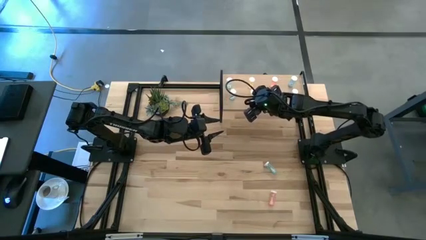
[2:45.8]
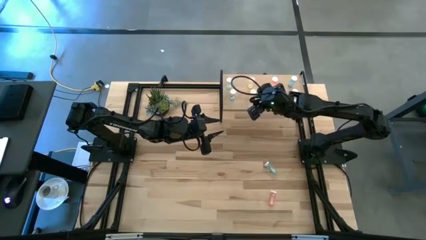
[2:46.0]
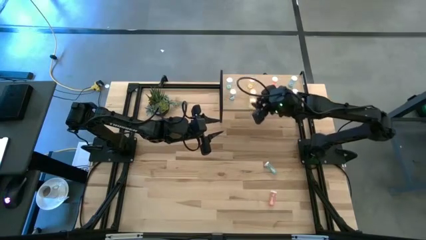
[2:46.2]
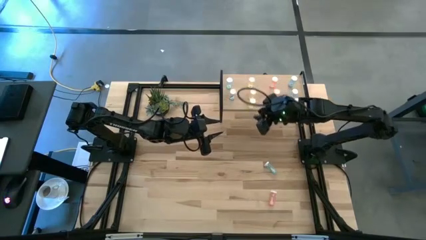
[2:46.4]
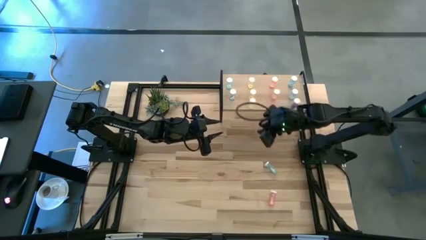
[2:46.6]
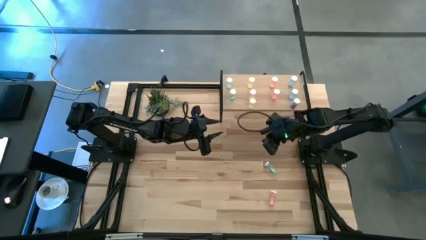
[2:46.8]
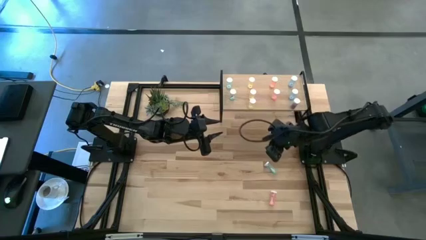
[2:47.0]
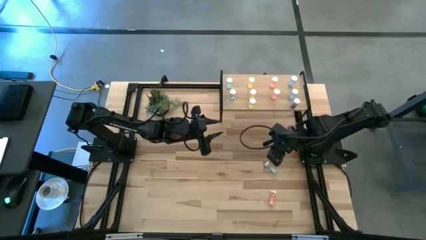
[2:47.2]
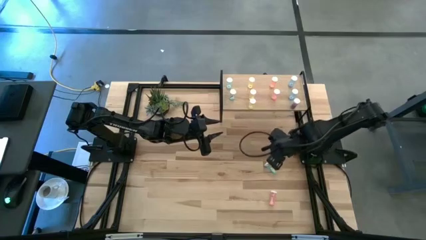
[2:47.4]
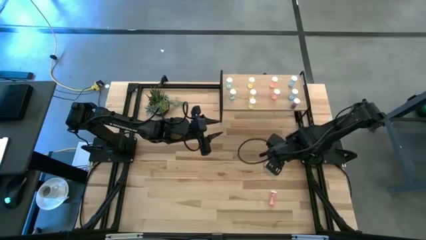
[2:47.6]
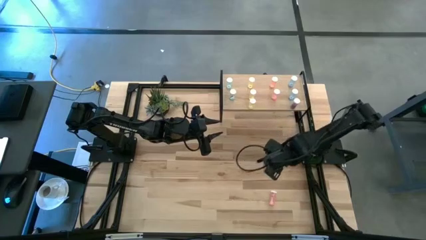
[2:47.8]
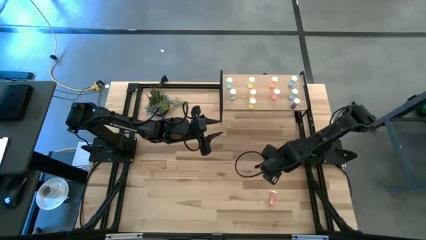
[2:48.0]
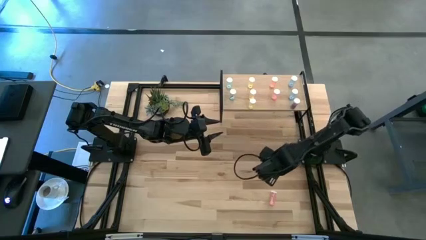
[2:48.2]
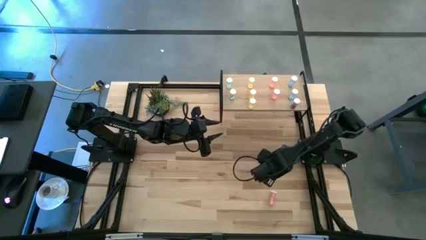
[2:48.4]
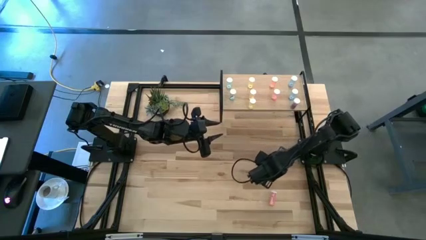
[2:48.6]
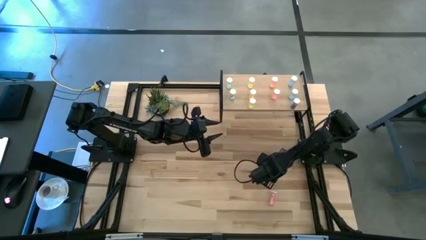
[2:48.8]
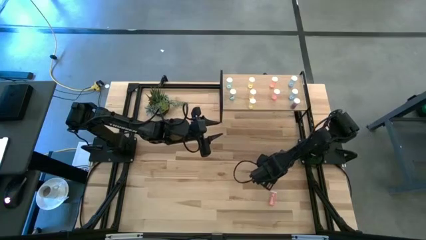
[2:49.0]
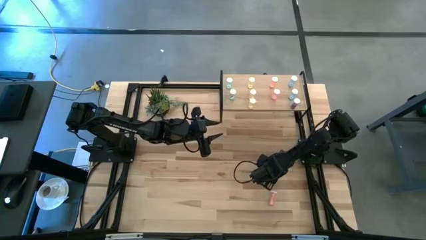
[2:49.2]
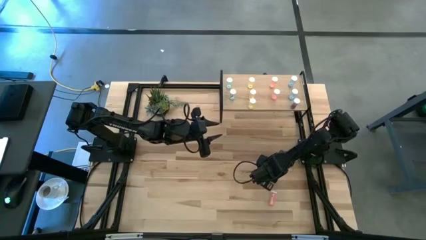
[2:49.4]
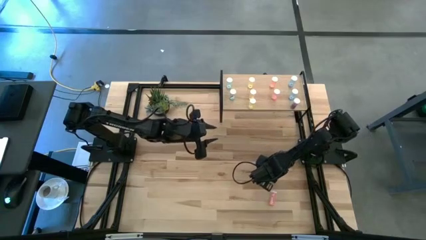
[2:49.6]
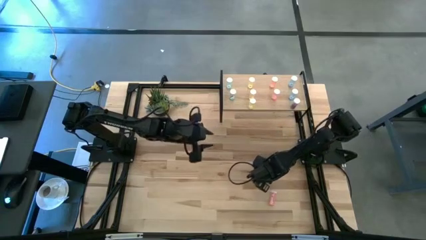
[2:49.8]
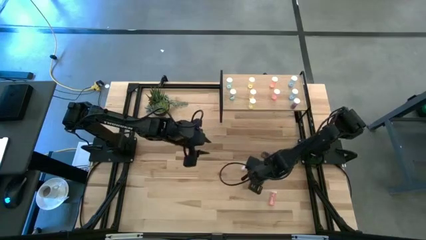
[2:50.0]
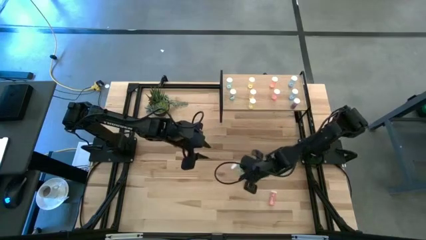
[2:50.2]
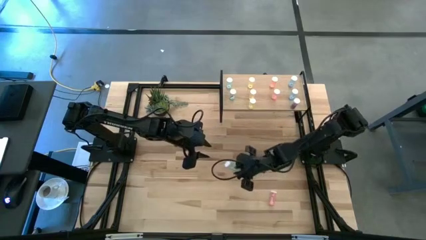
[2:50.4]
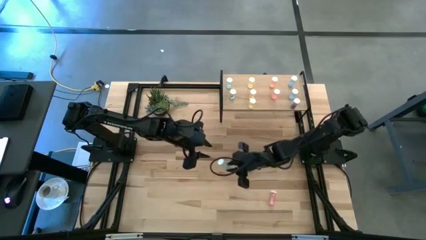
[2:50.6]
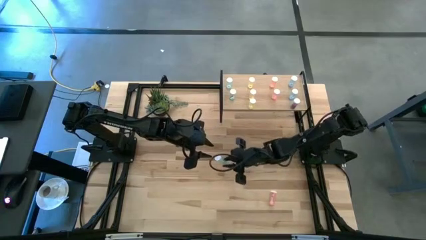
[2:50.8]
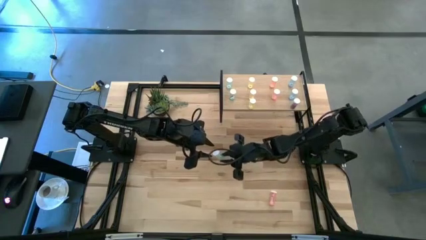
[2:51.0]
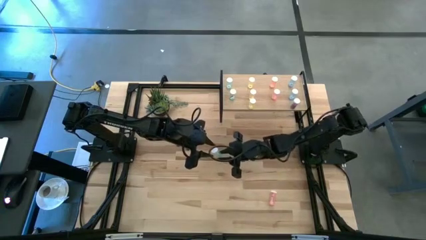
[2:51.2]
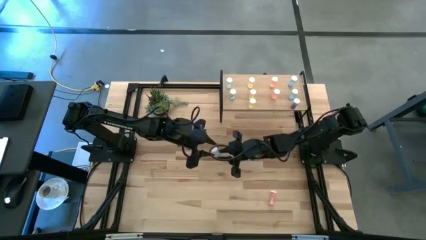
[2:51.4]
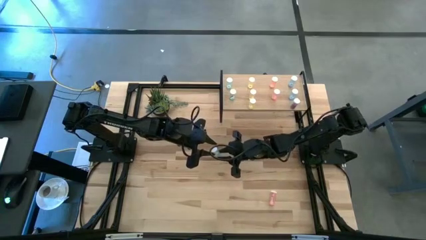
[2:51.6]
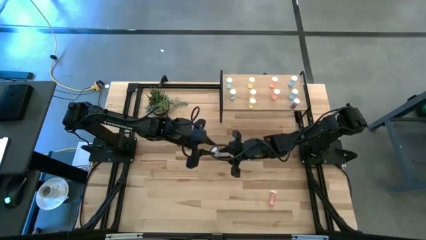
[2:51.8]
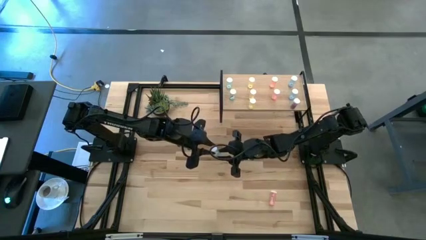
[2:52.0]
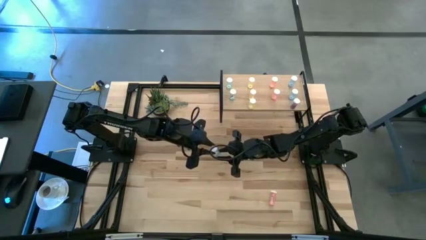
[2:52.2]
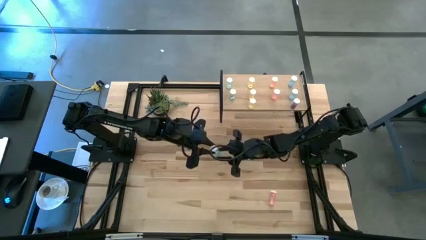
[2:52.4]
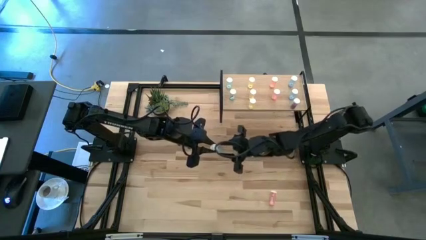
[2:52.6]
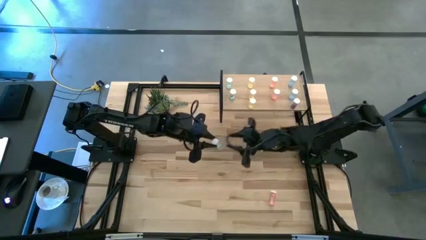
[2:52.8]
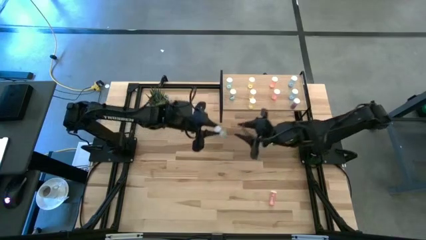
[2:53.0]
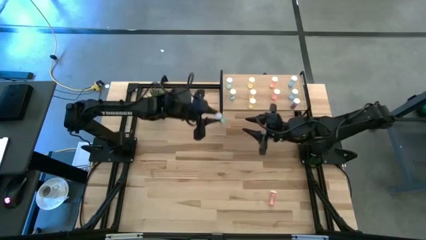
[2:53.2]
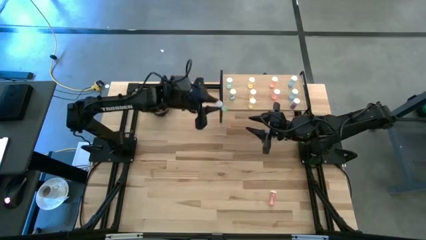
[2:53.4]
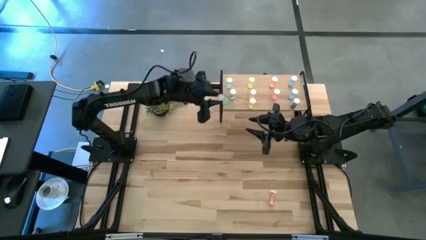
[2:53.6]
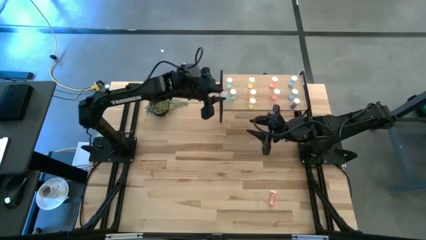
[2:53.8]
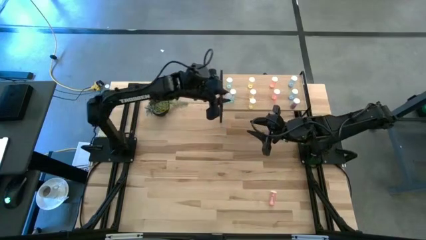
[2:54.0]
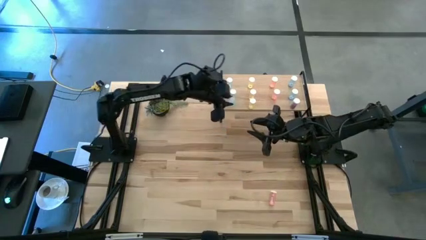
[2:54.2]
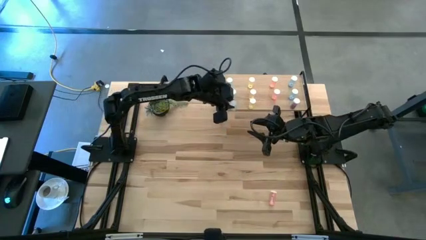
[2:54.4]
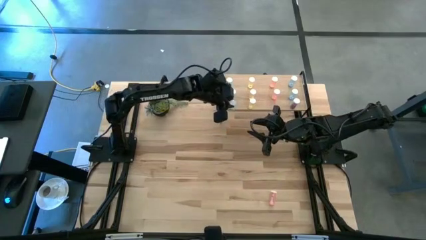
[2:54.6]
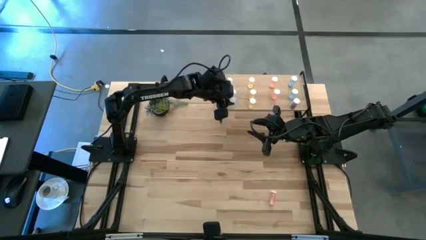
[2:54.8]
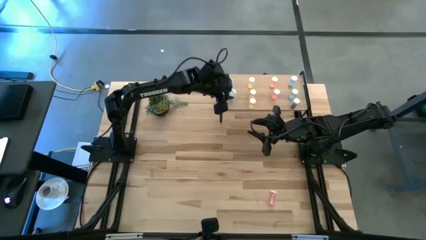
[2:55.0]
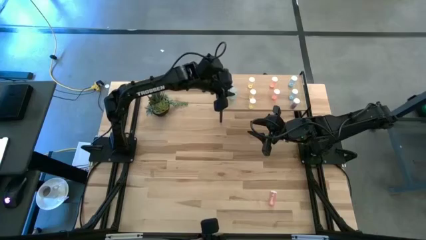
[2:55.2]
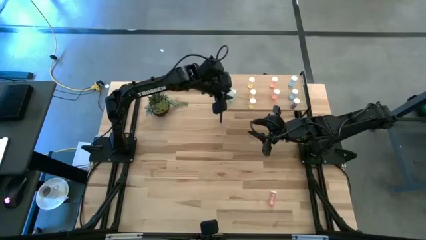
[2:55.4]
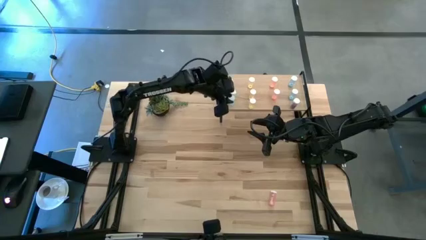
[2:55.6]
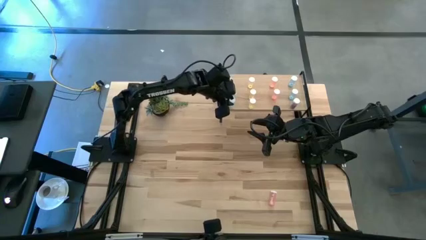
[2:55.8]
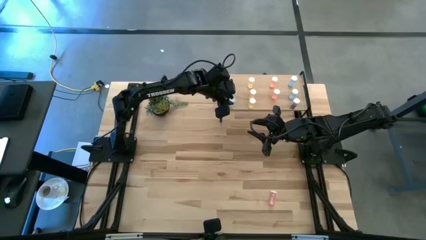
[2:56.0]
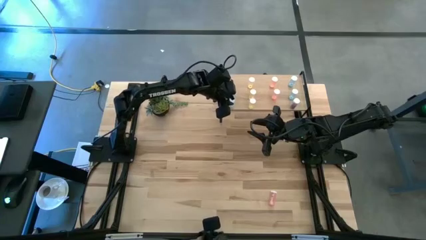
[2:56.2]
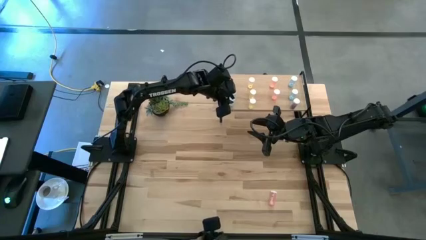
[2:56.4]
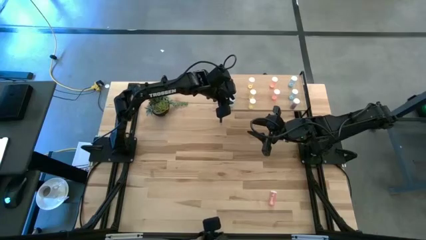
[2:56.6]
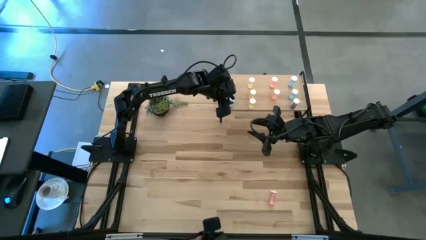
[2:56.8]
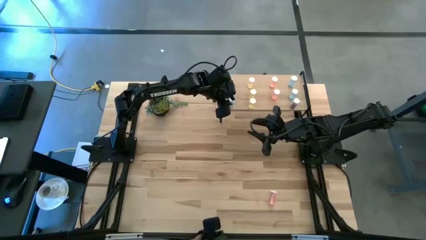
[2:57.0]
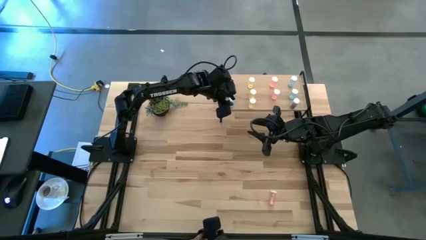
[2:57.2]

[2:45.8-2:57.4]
Task: Pick and place medicine bottles onto shelf by color
Put the light blue pill bottle aligned with the other light blue pill bottles on the shelf
